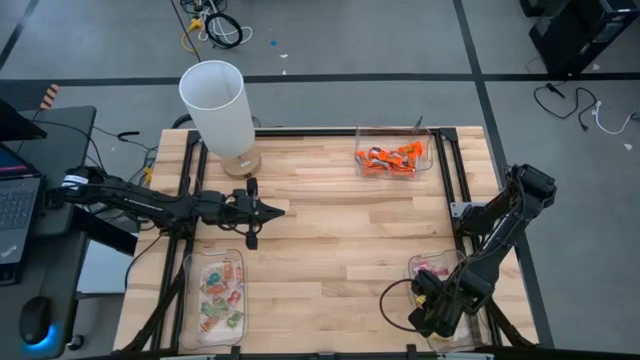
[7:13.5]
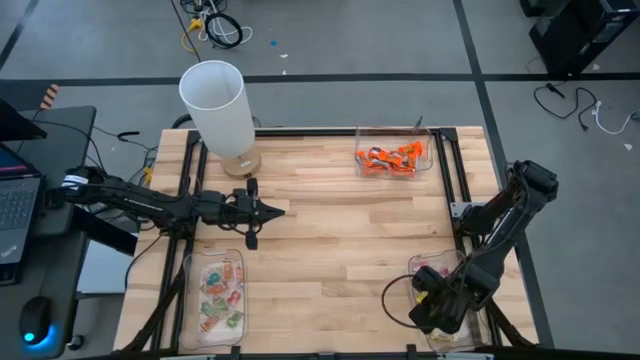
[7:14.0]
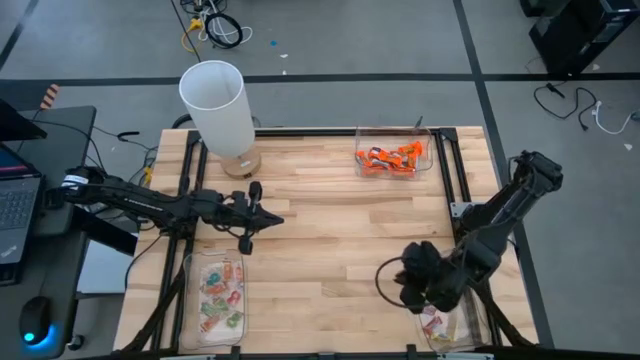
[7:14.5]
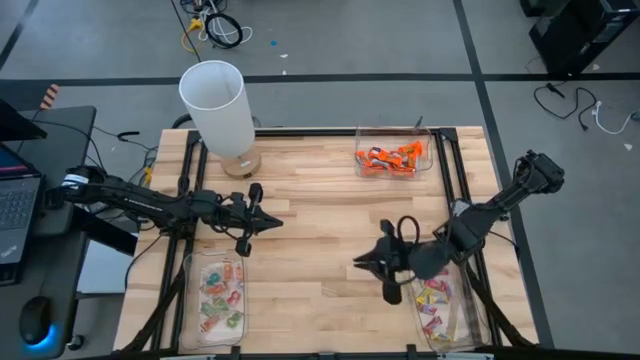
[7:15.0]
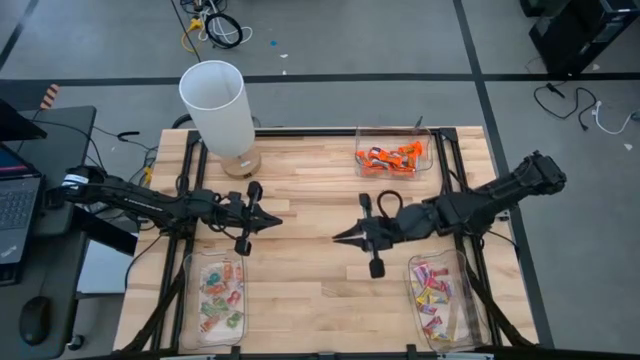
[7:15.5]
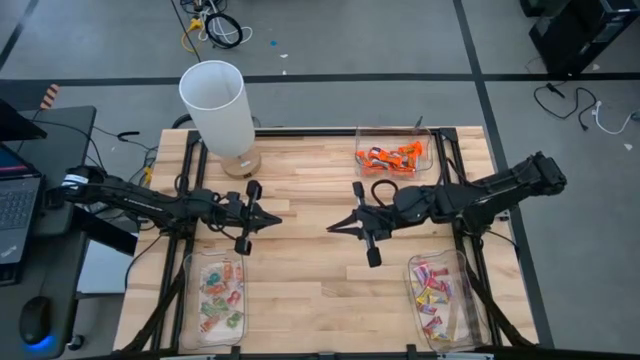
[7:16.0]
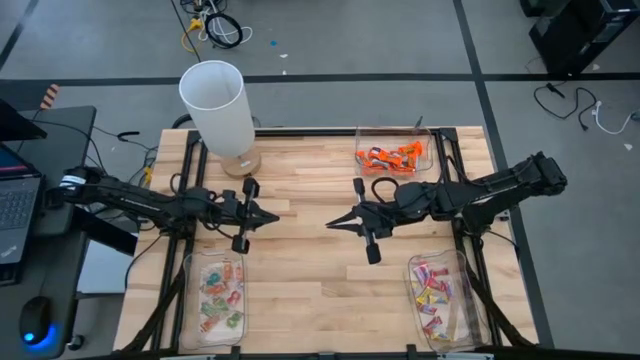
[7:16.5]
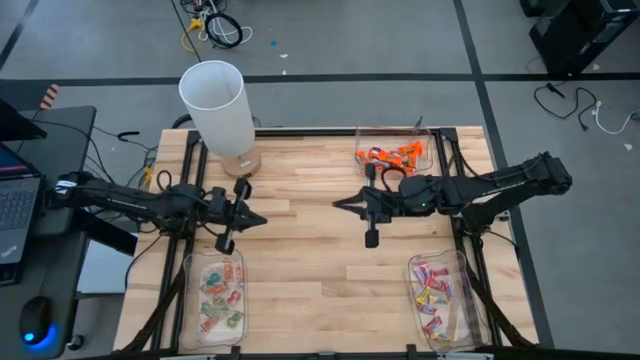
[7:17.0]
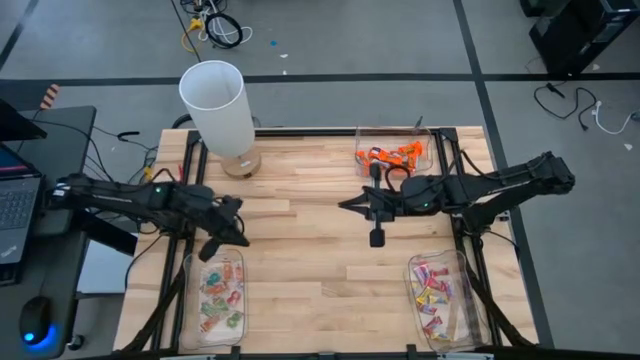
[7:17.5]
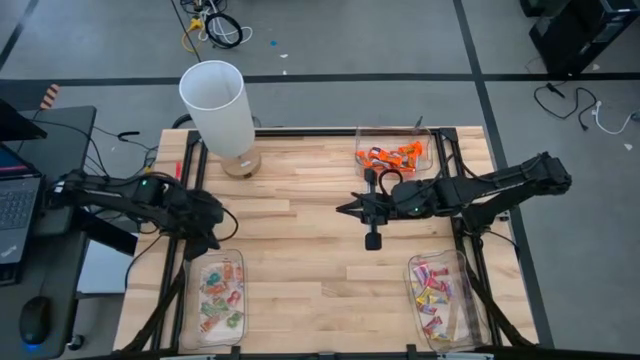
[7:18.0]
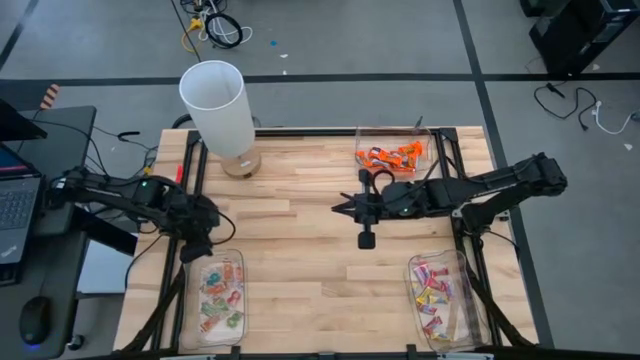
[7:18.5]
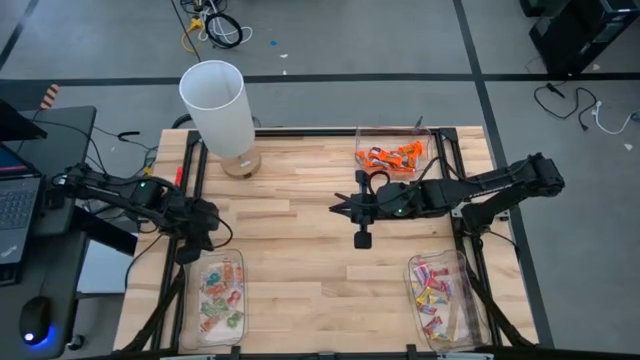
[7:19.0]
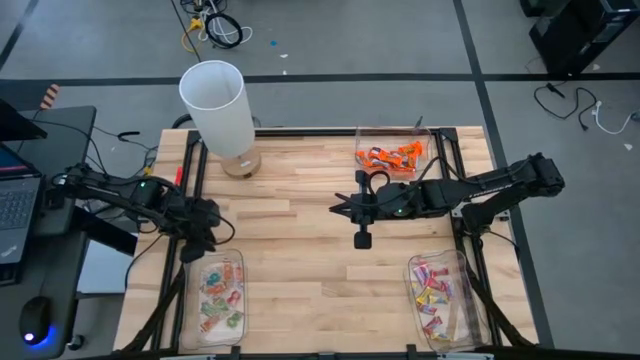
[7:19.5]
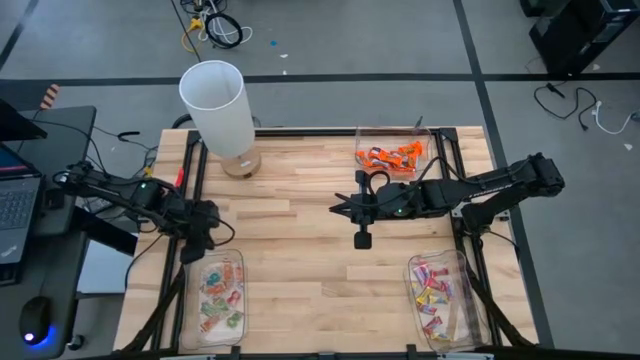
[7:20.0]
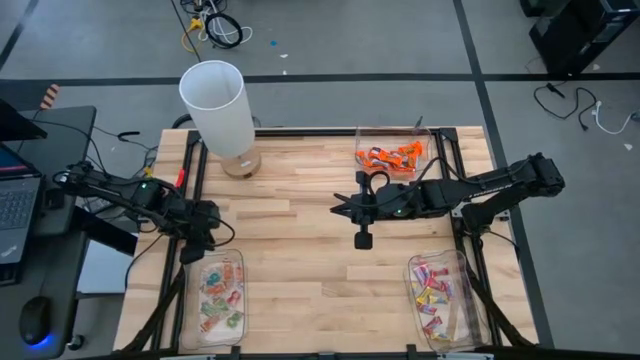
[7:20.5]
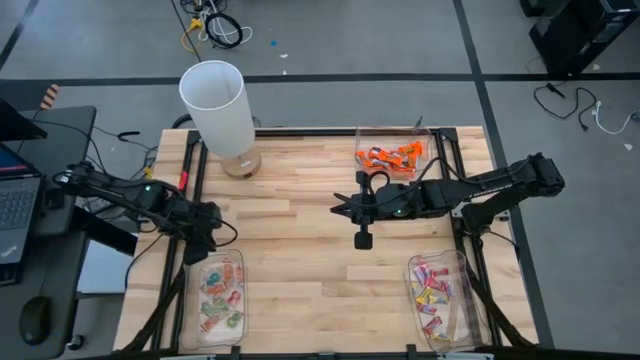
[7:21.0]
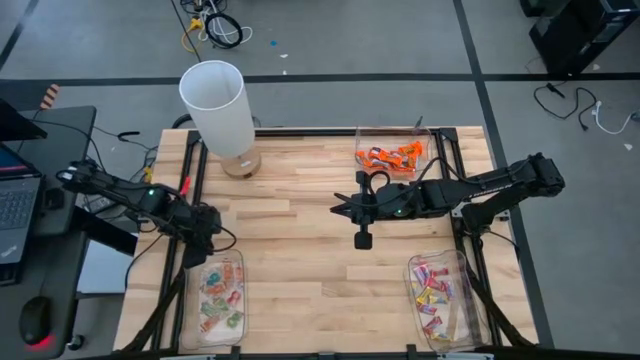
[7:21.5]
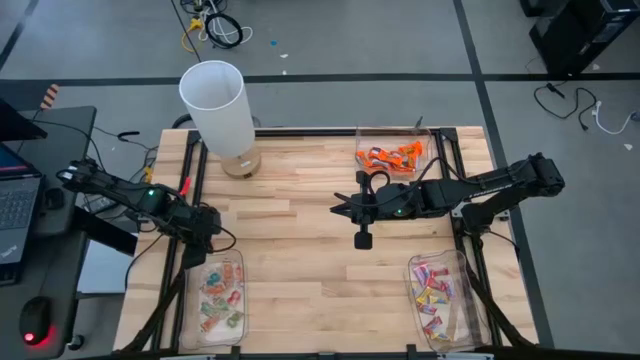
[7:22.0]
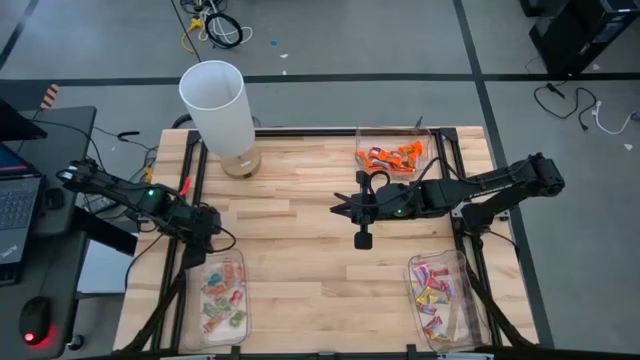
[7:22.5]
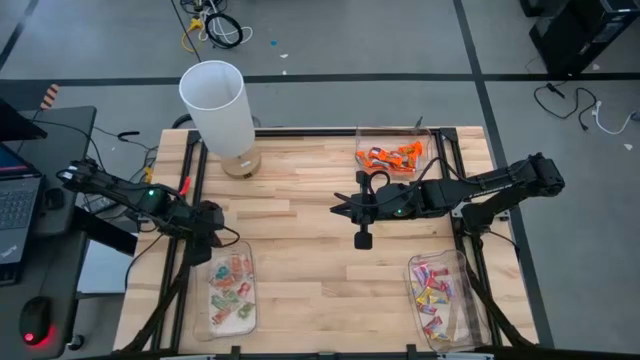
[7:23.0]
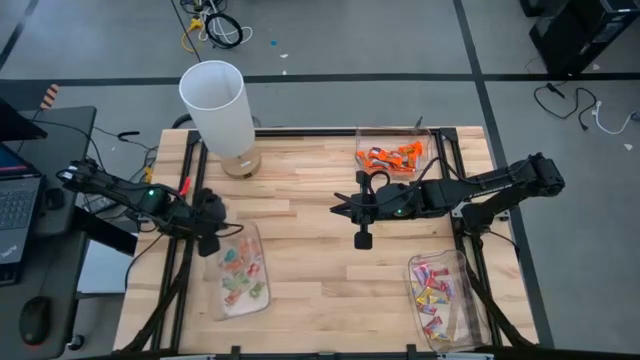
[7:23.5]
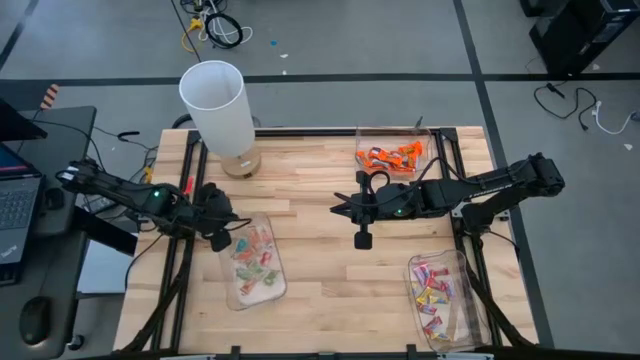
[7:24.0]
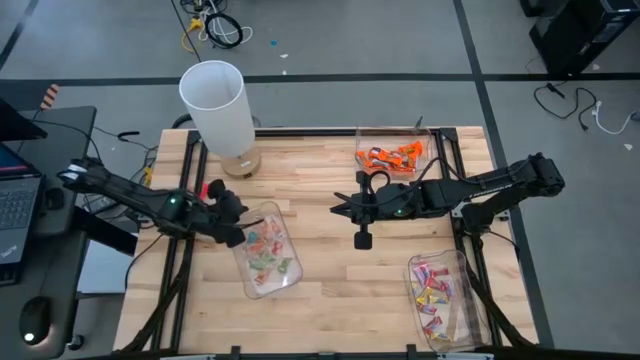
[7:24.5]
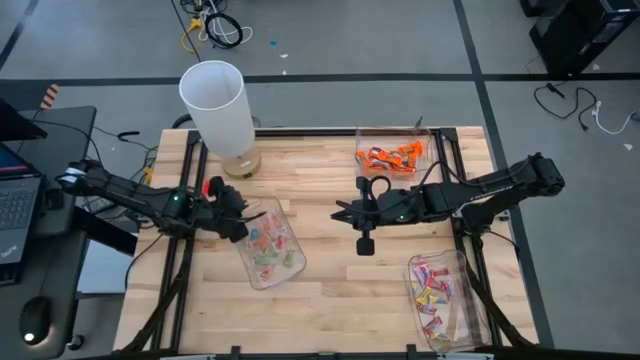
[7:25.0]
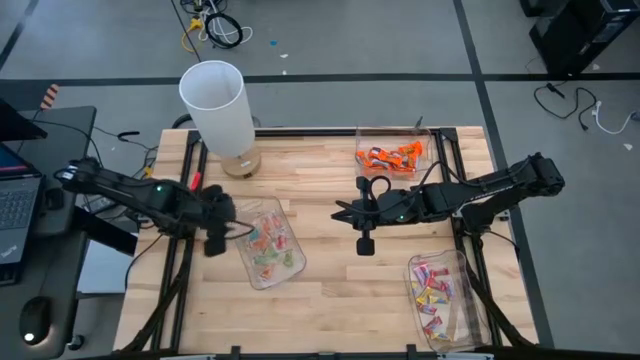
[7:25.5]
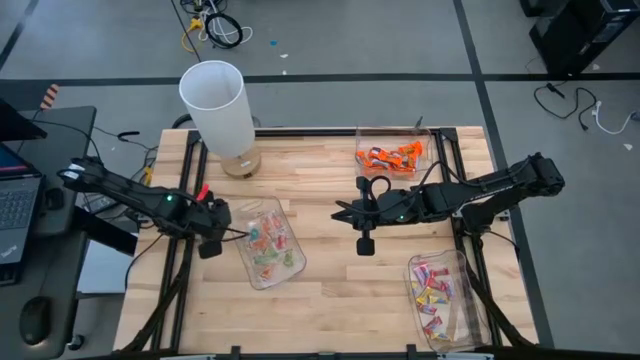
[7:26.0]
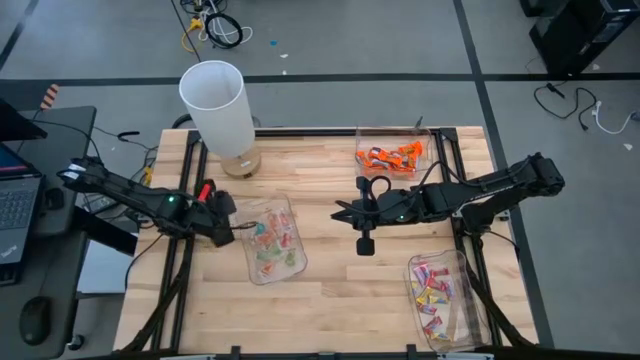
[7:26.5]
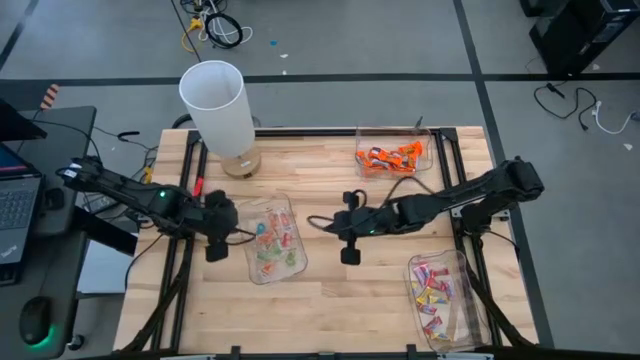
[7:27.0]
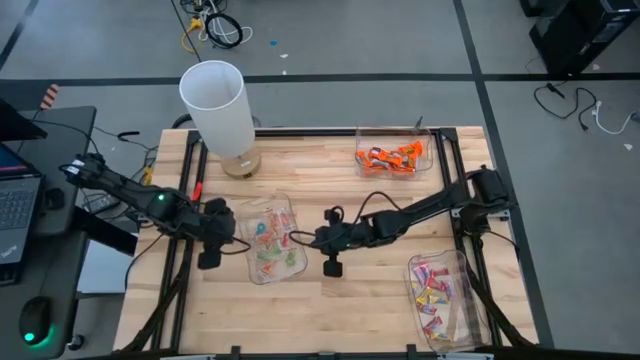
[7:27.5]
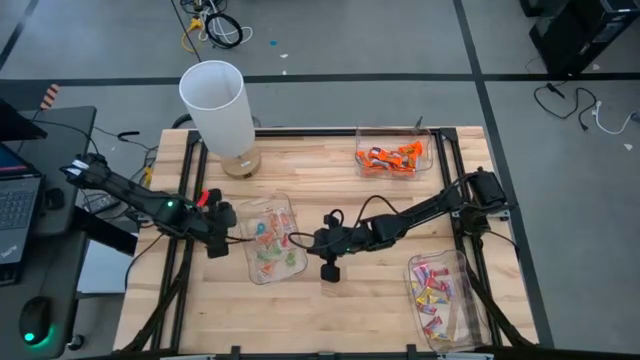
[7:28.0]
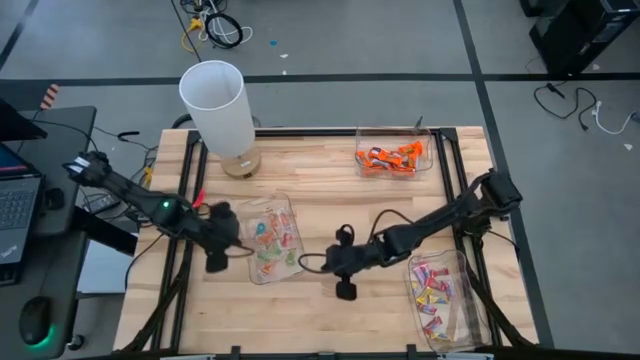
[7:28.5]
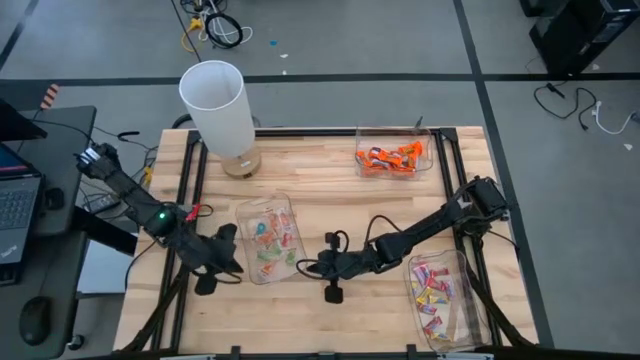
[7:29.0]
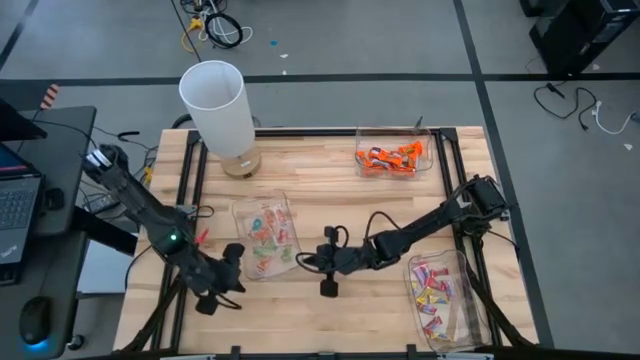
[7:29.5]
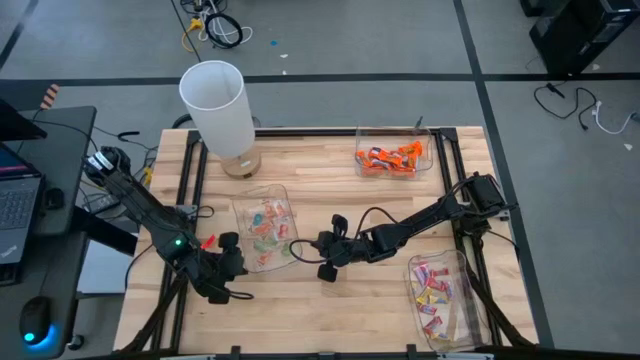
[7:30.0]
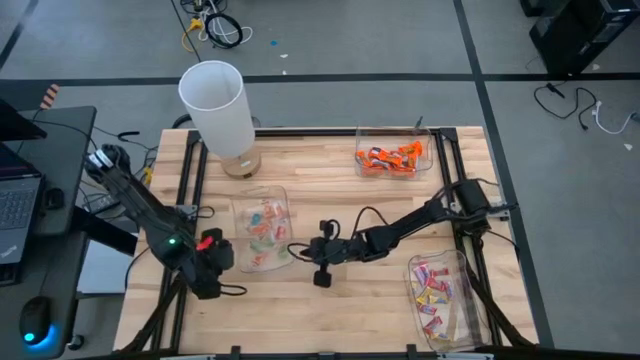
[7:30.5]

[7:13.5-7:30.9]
Task: Sort candy
Move the bottom left transparent bin to the middle left of the table

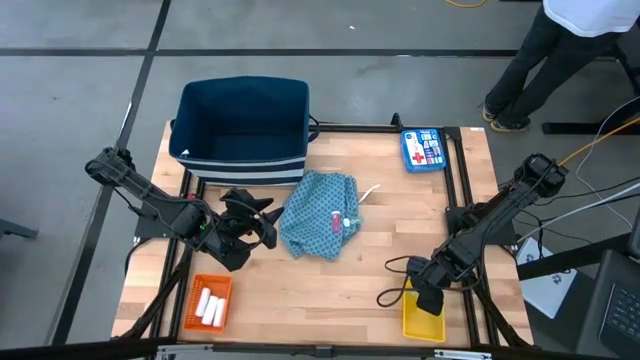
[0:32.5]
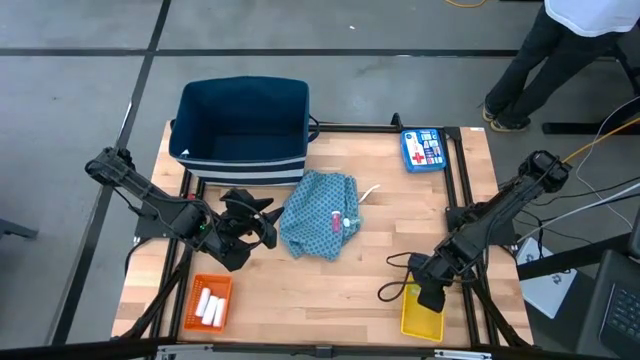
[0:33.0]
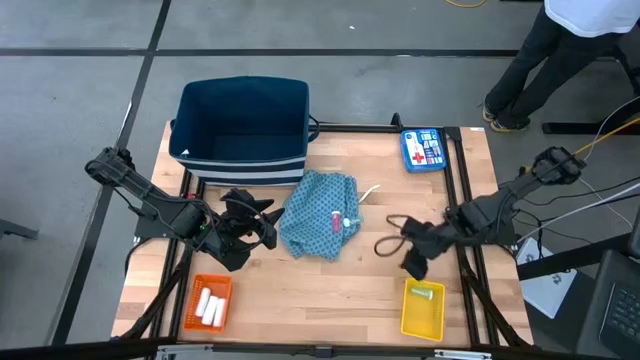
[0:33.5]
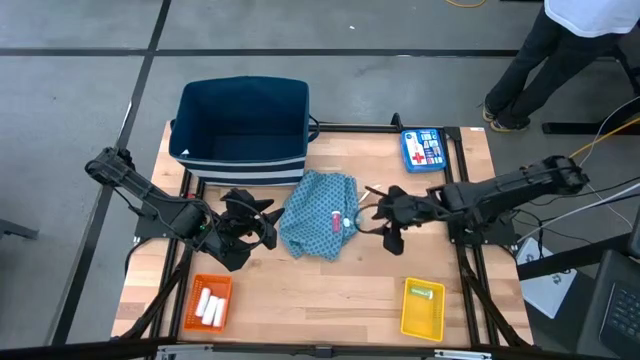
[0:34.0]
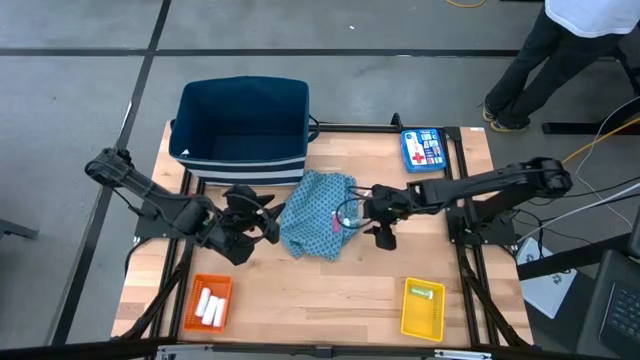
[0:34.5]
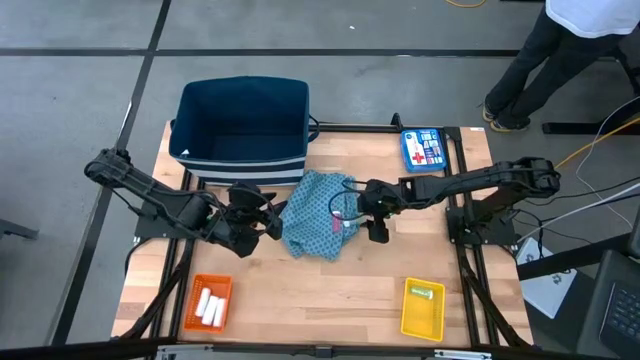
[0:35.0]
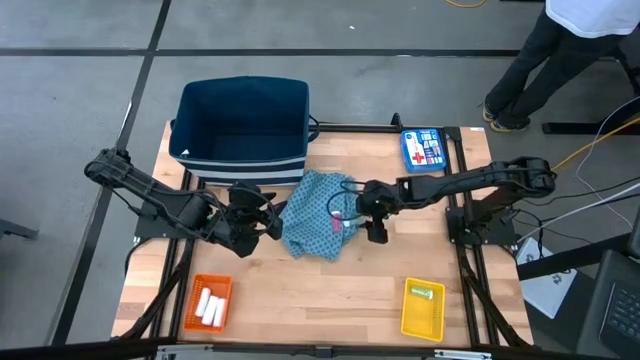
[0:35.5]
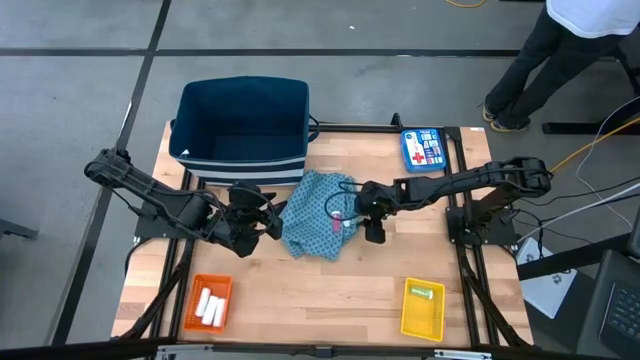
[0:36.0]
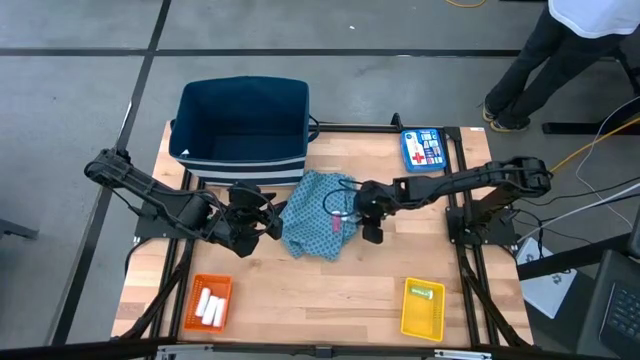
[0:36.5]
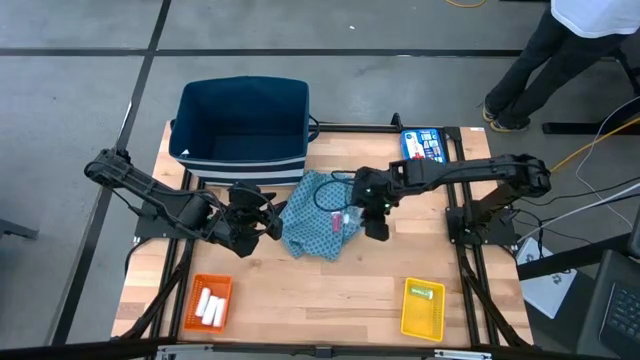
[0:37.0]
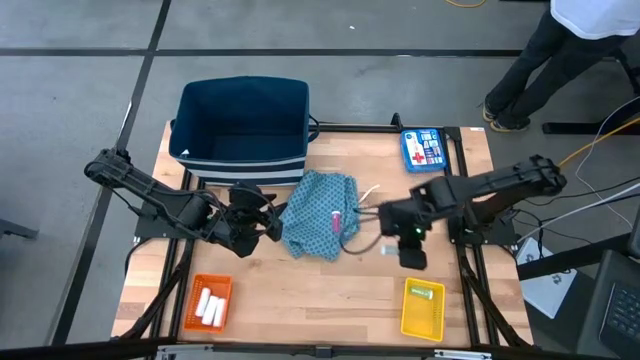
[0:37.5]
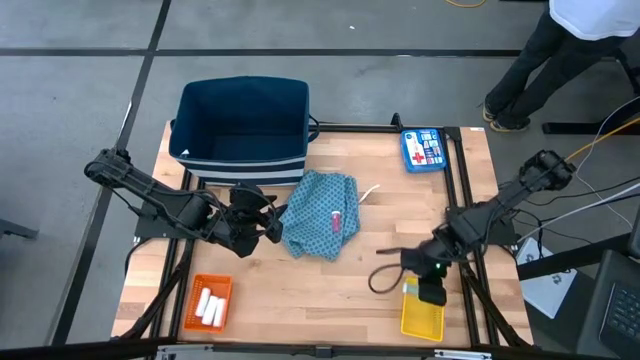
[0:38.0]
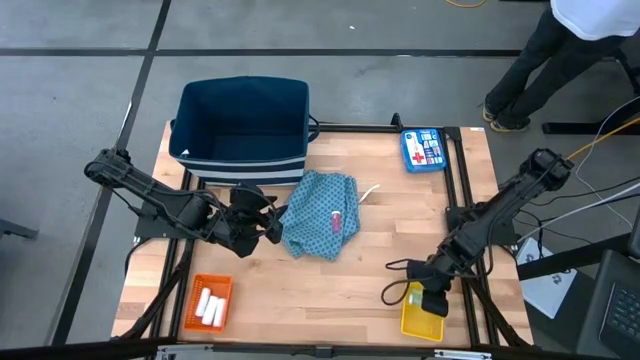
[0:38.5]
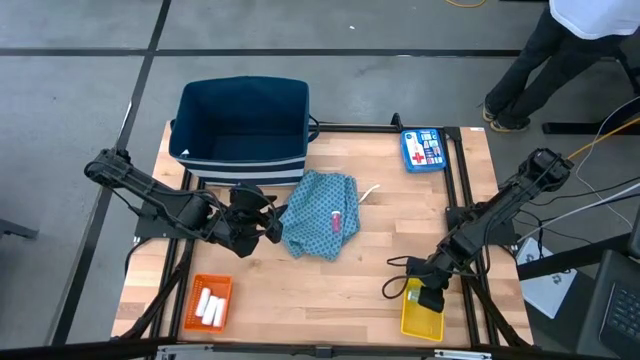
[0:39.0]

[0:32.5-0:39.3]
Task: Pick & Place Medicine items
Put the green pill bottle into the yellow bin
